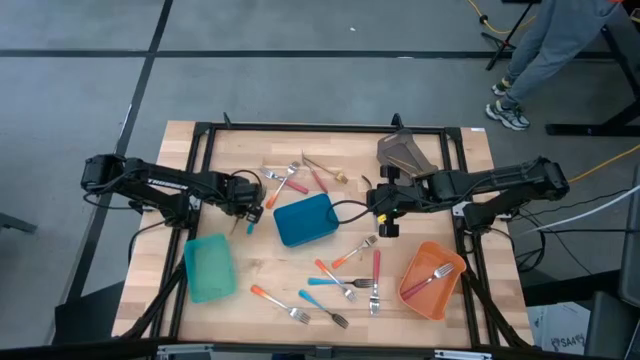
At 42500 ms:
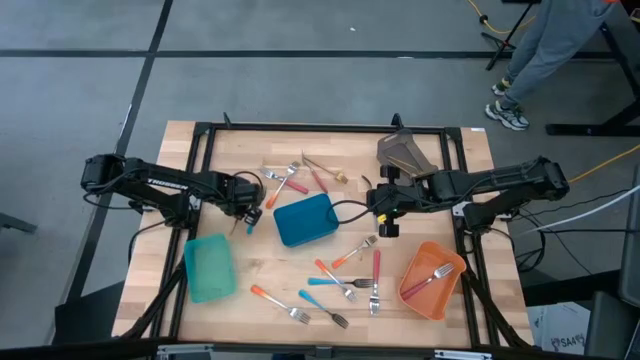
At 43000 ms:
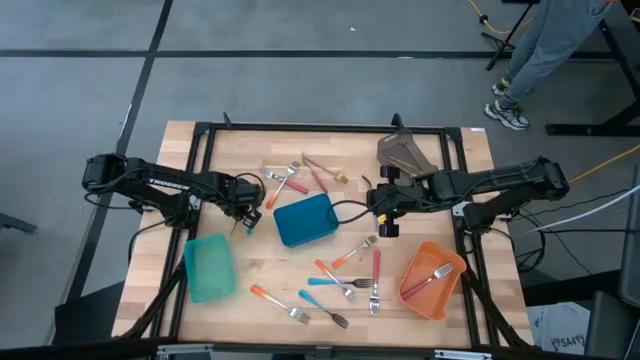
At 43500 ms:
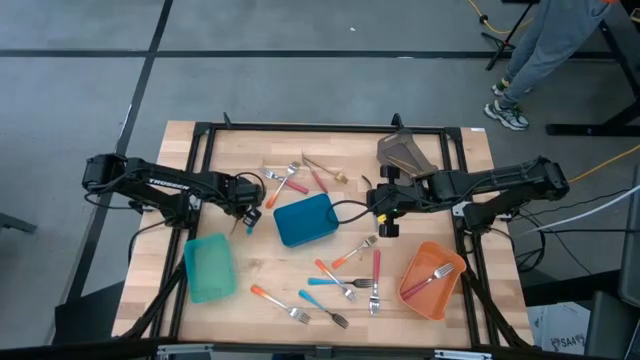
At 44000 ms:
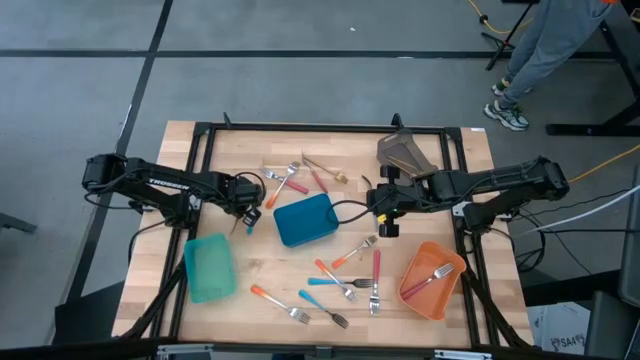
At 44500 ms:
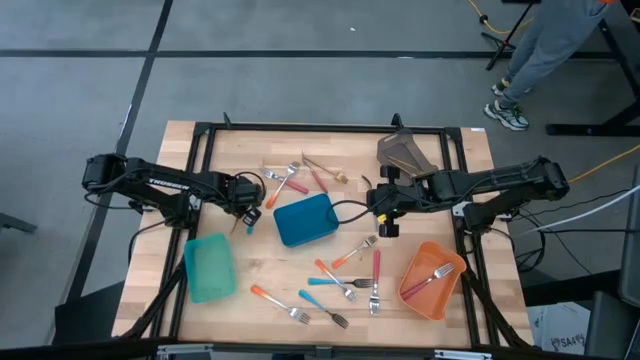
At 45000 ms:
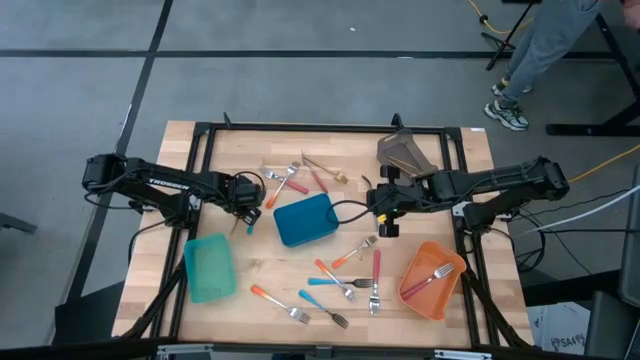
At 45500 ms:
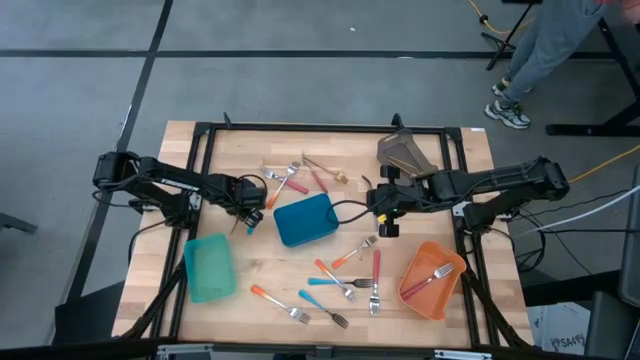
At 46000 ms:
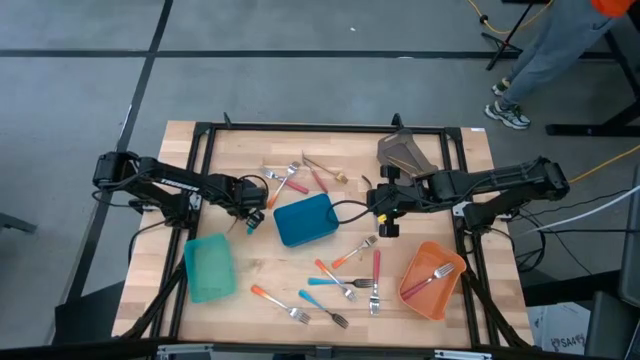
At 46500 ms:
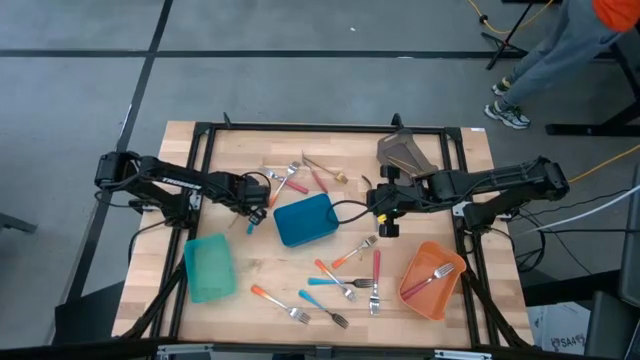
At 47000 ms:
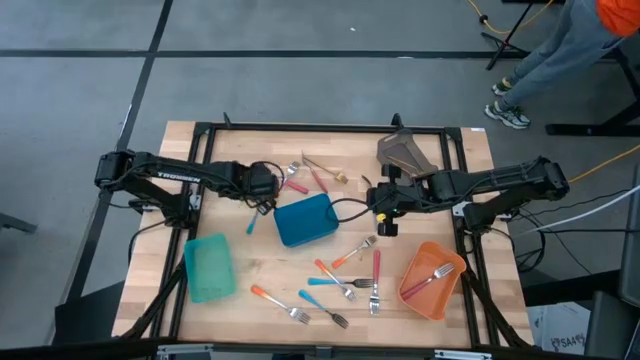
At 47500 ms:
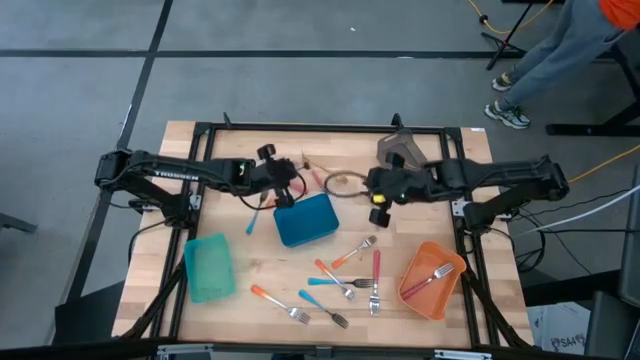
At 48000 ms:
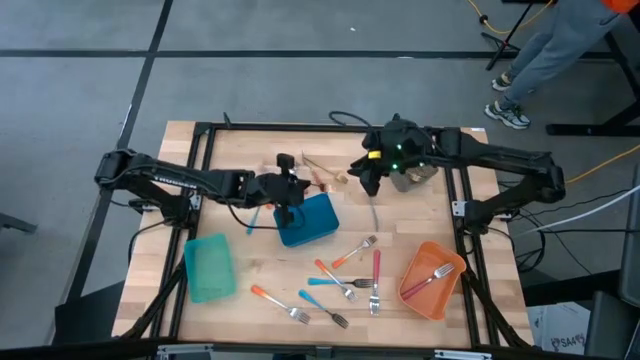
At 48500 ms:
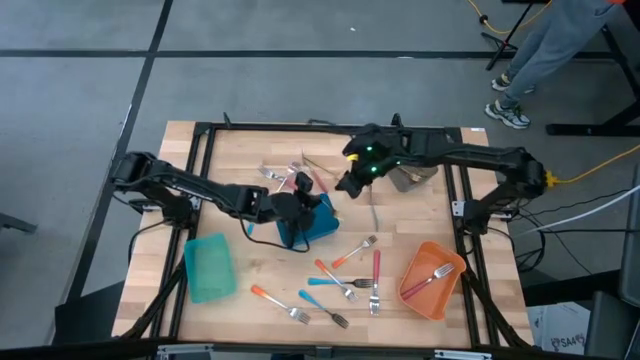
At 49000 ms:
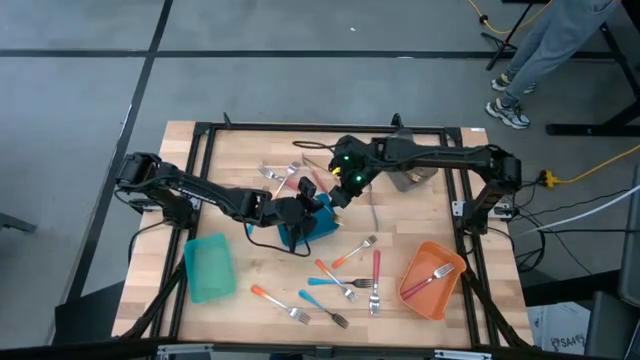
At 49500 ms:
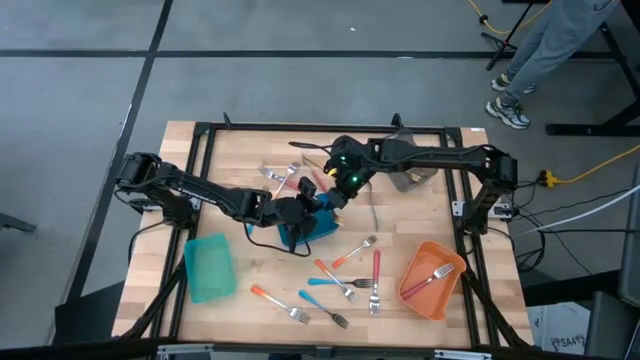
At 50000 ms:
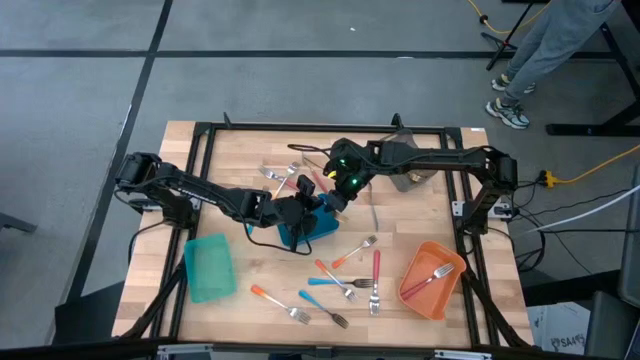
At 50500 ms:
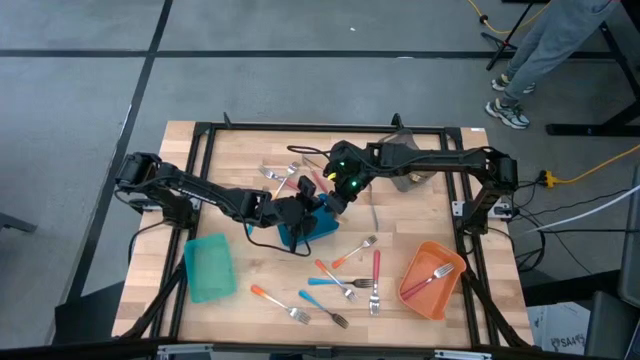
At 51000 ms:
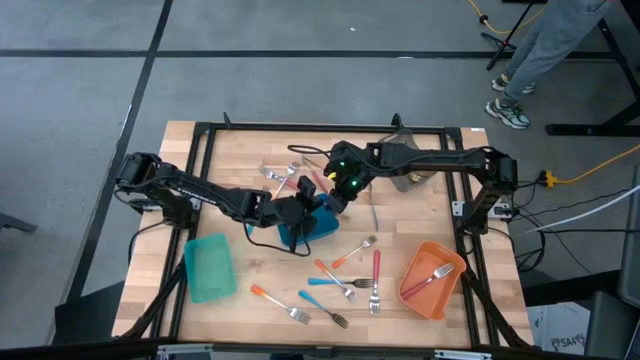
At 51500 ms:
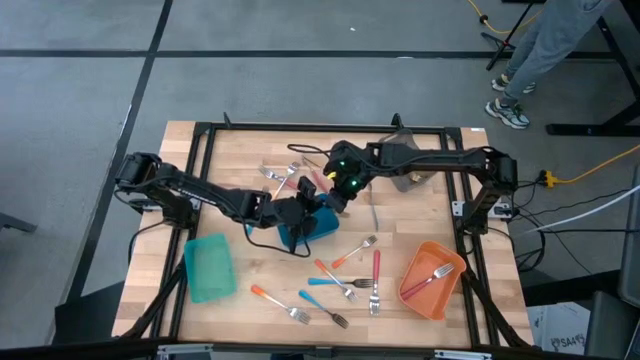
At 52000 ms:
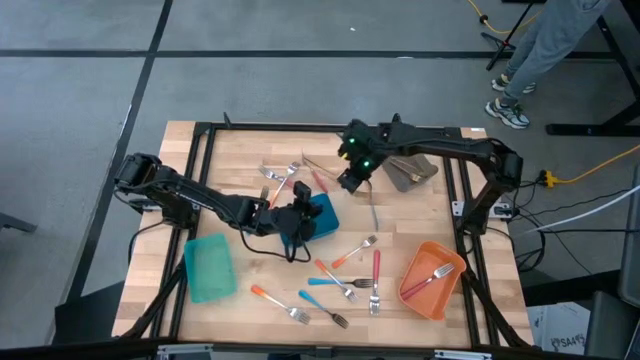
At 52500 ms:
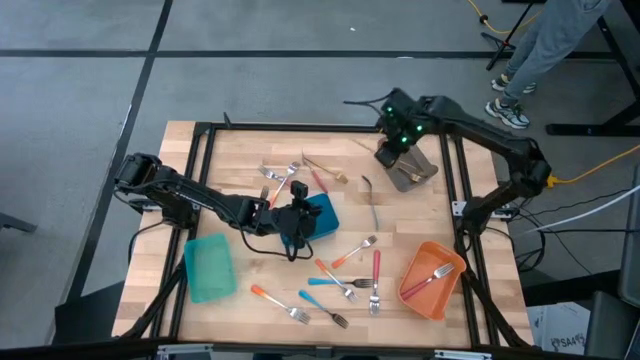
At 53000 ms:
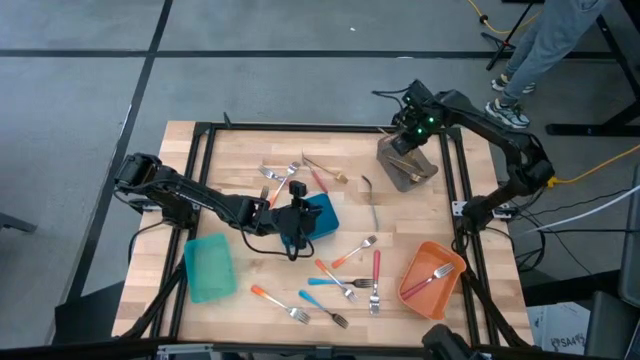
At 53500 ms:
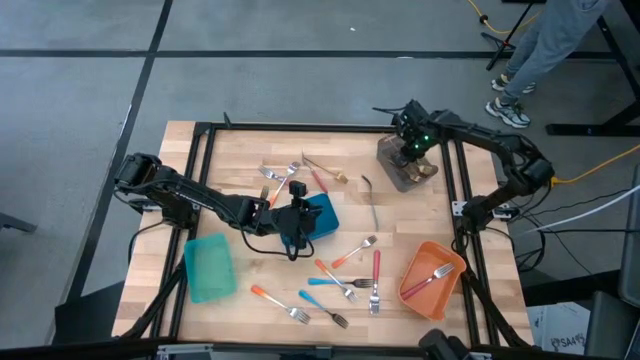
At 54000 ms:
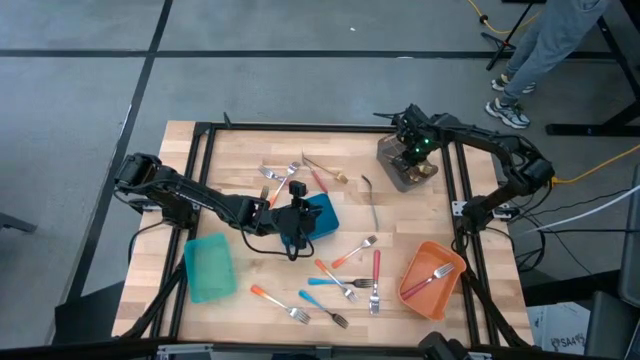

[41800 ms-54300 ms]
Task: Sort silverware by color (type)
Put the golden fork into the black bin

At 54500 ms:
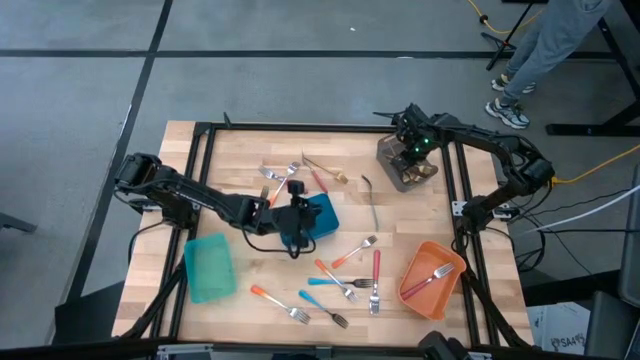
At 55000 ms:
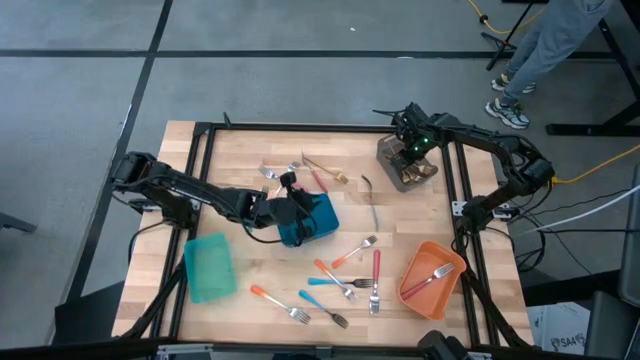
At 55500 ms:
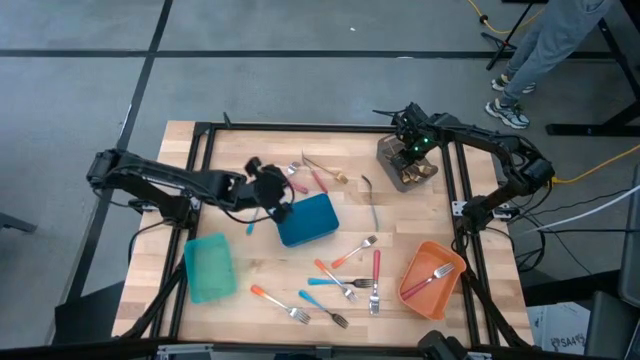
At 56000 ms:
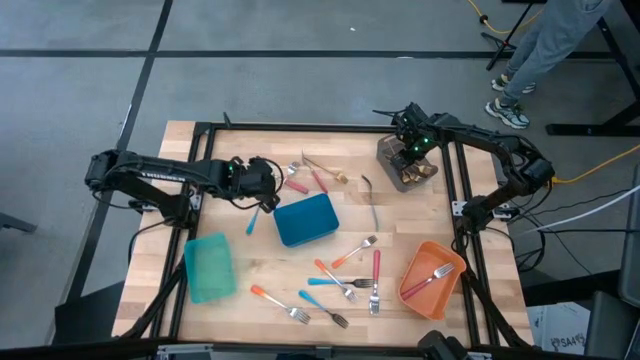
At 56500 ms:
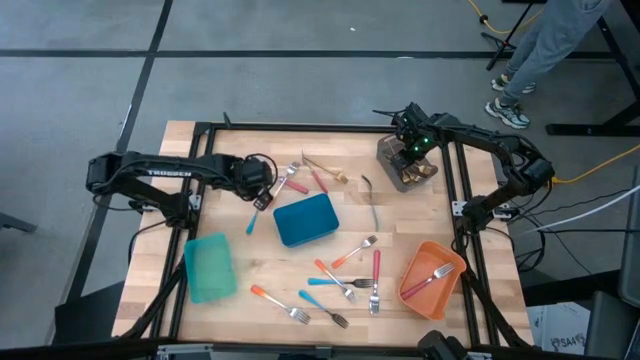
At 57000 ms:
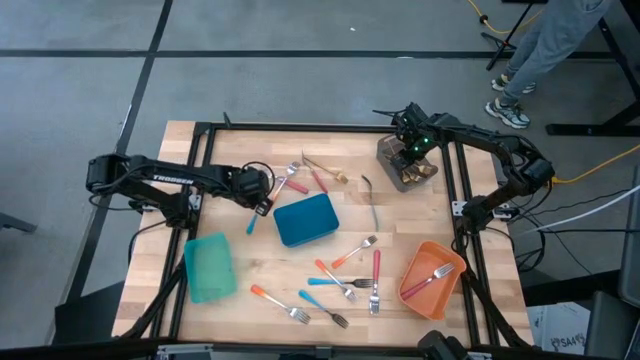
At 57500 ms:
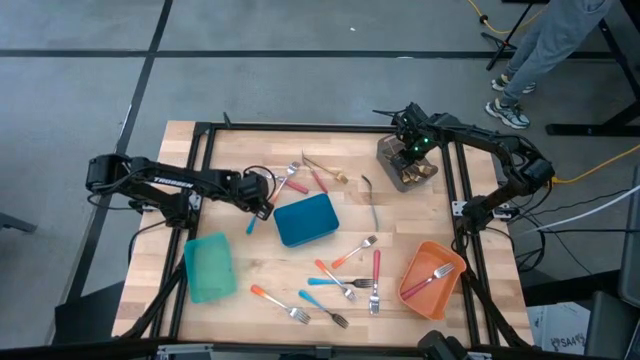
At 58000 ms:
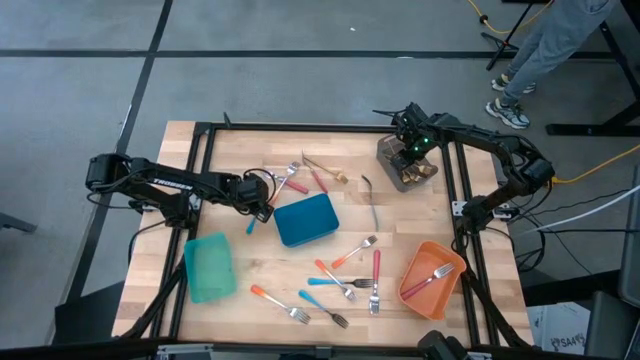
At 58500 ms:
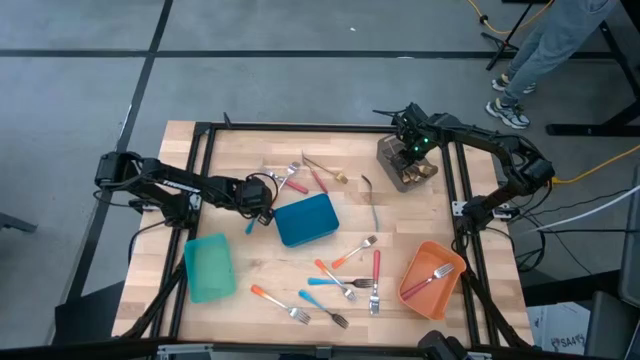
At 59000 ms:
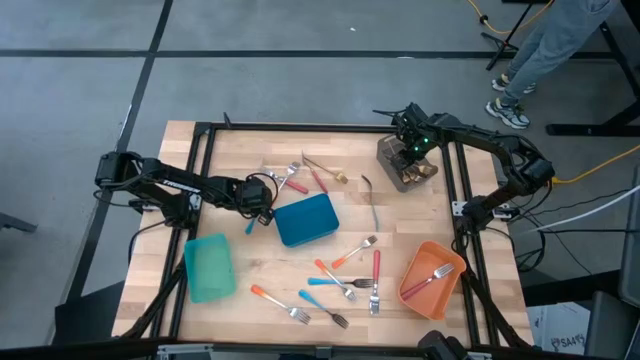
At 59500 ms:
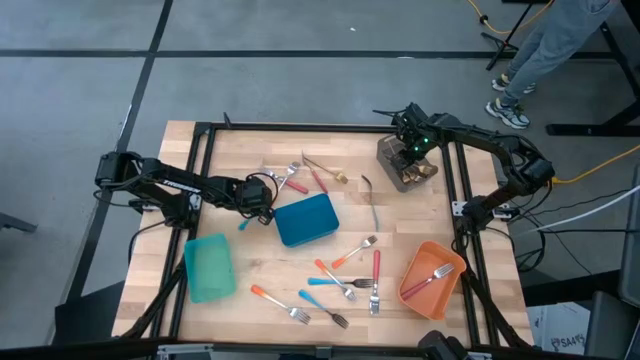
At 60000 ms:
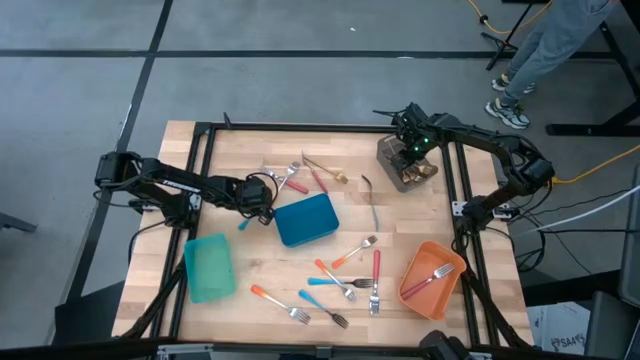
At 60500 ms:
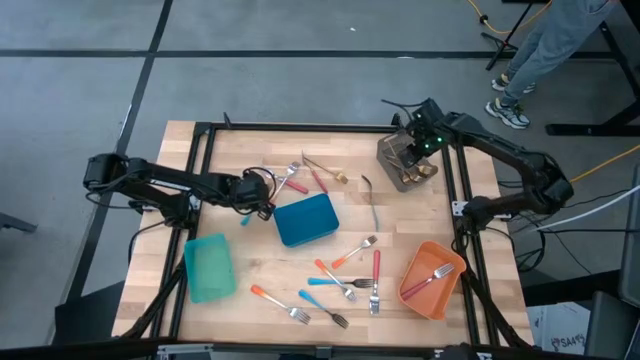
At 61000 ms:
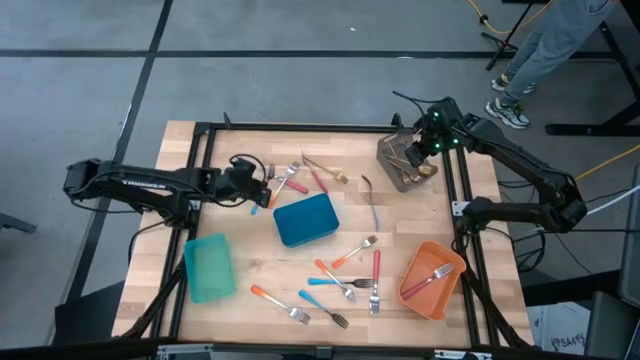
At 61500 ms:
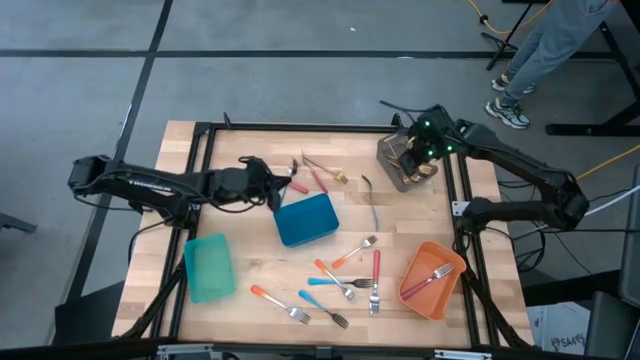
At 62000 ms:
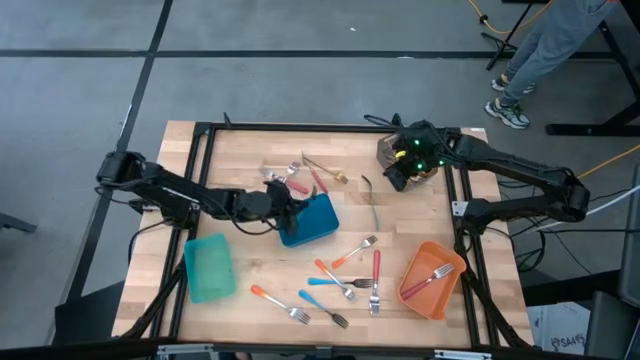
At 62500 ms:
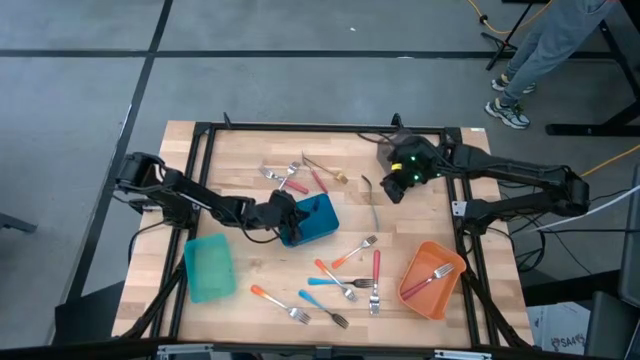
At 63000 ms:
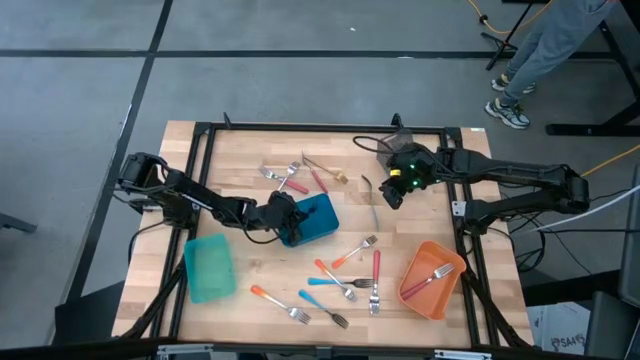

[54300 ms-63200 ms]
Put the top left blue fork into the dark blue bin
